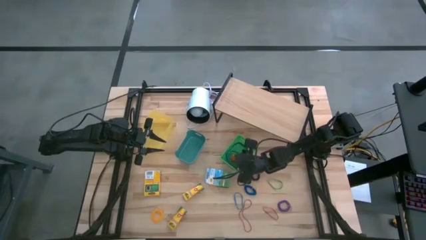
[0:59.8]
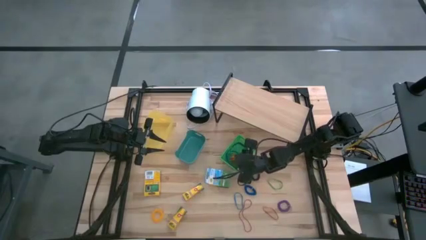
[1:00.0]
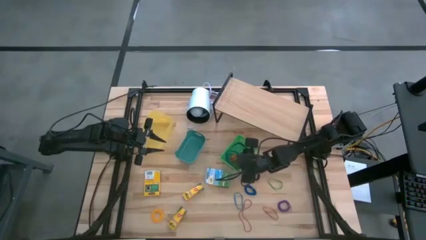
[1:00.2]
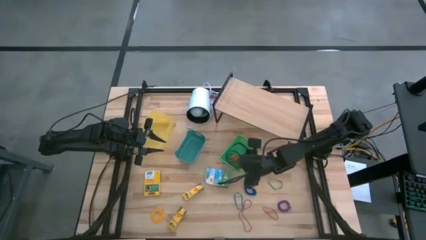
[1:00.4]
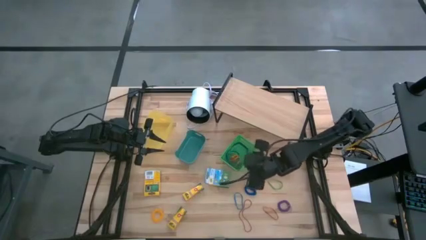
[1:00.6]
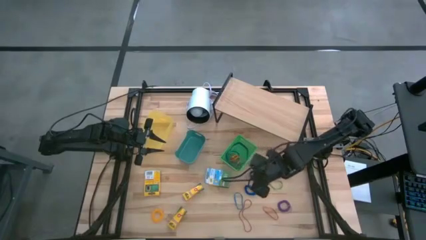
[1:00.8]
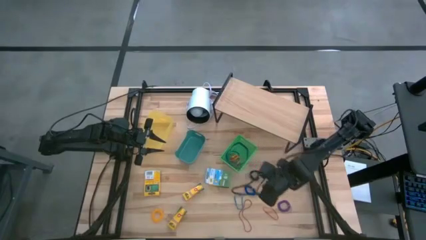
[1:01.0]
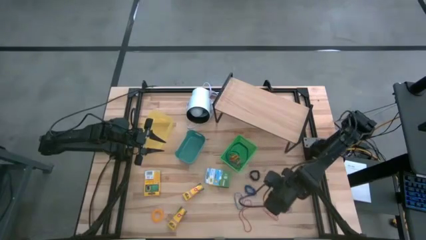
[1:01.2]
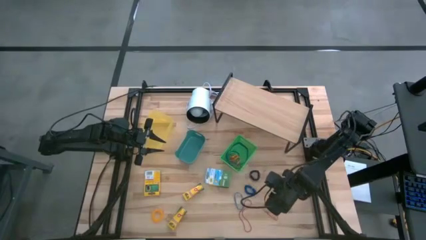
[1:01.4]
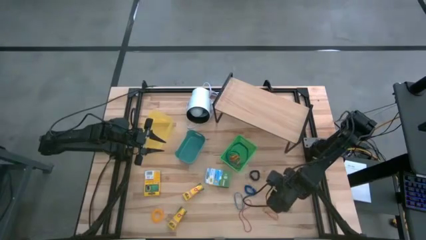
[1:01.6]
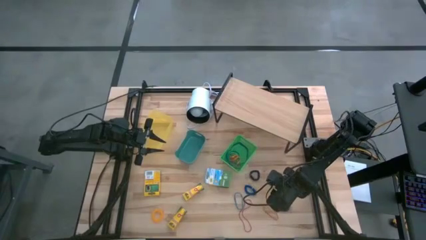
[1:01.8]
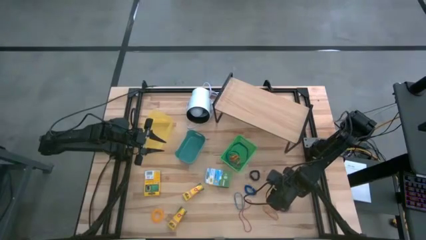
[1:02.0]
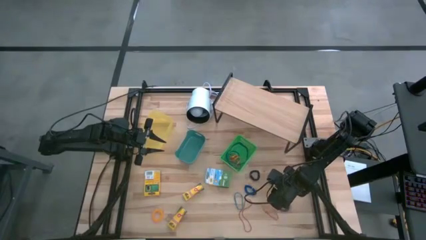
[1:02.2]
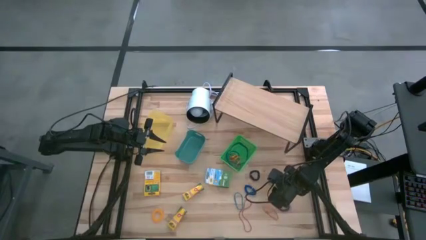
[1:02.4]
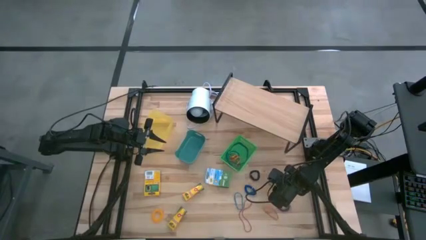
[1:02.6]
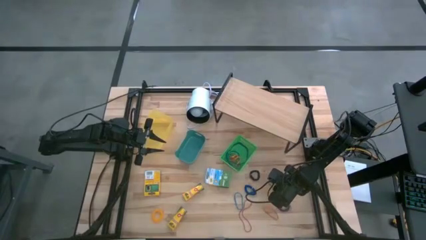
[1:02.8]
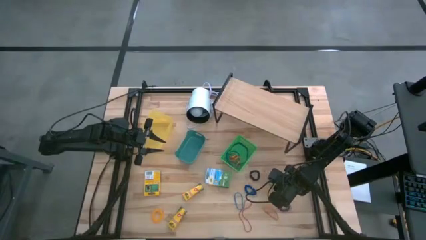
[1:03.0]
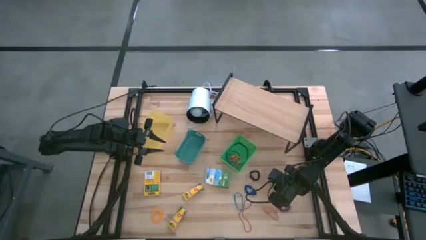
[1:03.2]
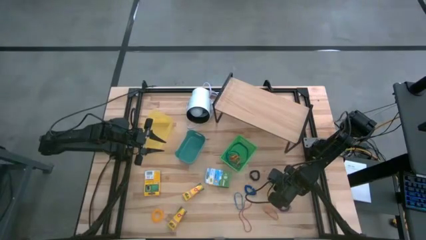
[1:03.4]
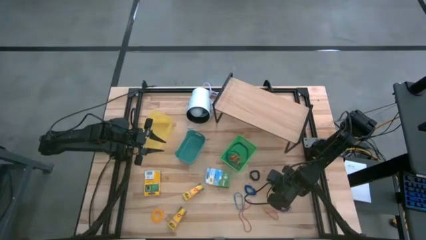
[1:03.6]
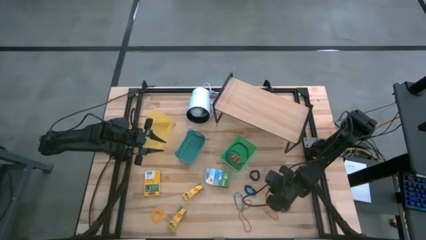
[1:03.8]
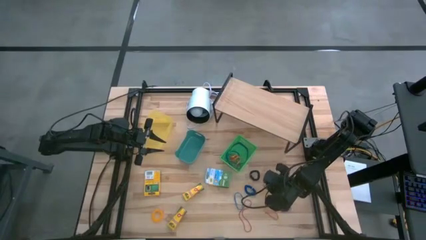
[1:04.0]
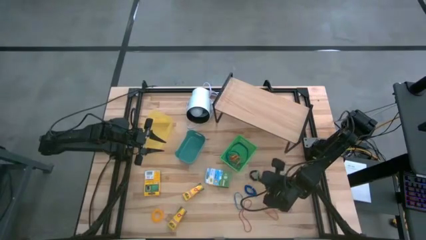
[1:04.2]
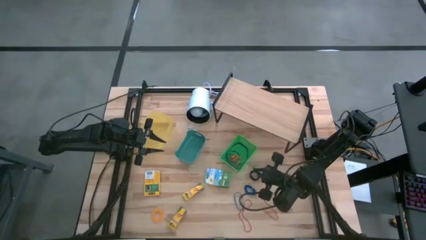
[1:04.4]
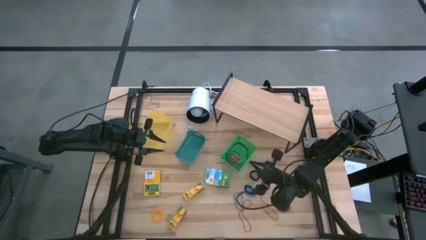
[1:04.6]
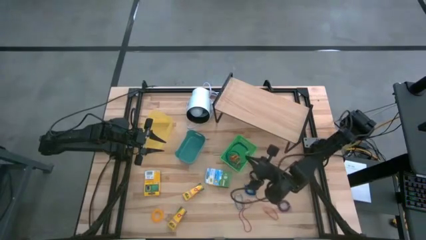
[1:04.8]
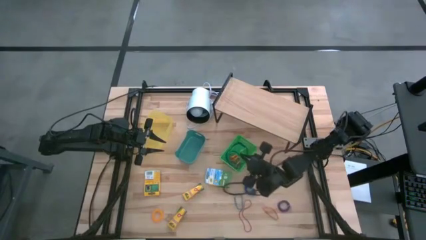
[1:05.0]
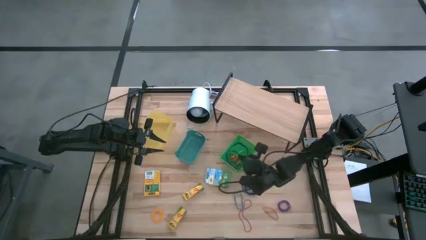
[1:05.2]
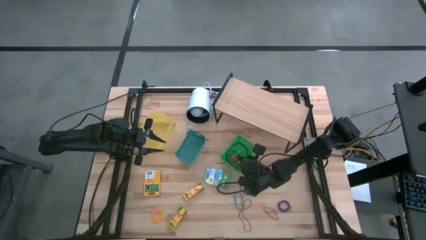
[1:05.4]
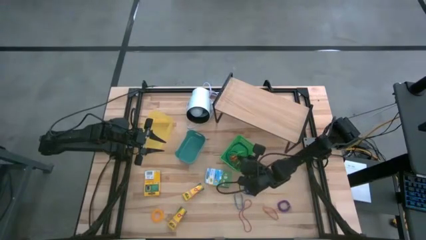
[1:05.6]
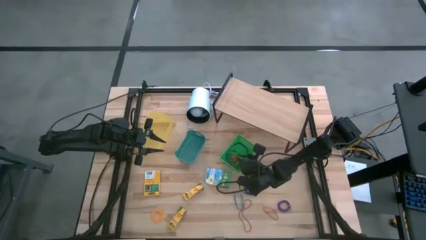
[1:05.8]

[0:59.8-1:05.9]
Task: Pick & Place Office Desk Supplies
Put the green rubber band into the green bin

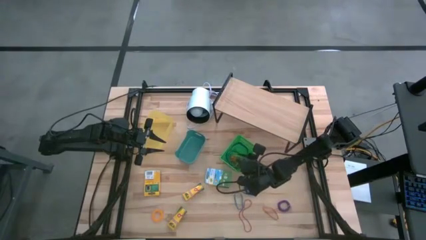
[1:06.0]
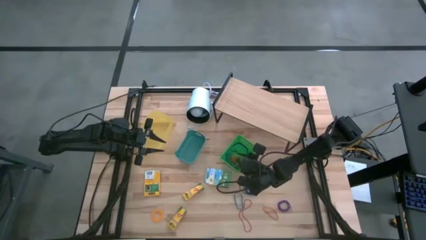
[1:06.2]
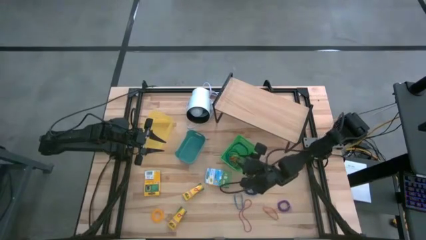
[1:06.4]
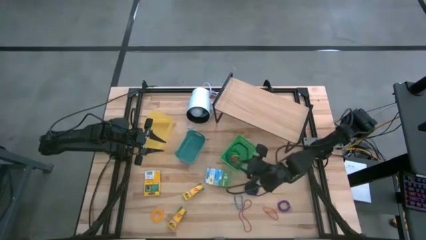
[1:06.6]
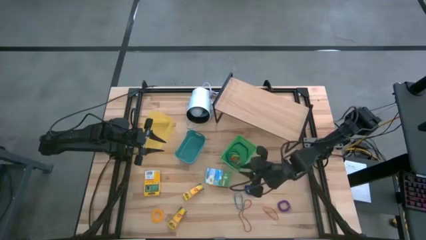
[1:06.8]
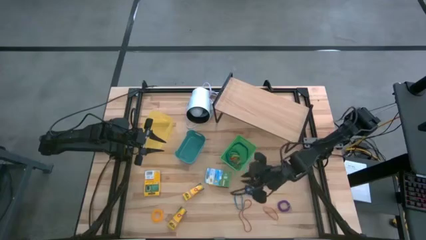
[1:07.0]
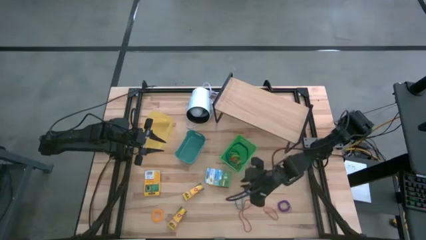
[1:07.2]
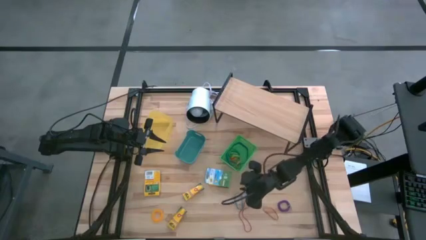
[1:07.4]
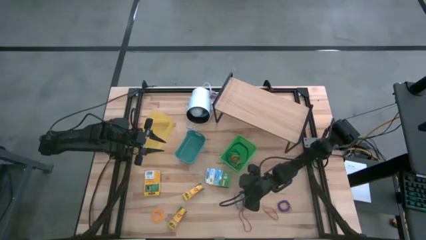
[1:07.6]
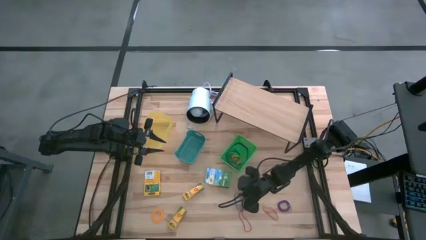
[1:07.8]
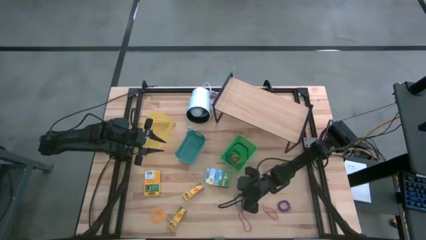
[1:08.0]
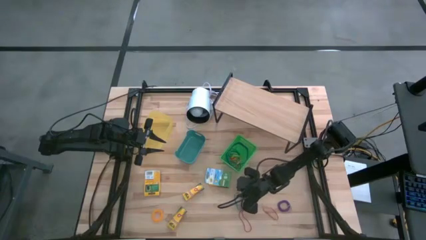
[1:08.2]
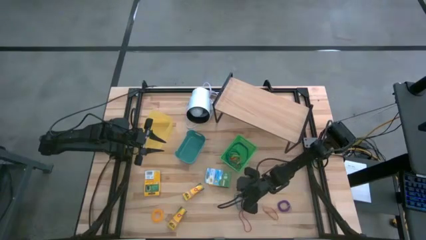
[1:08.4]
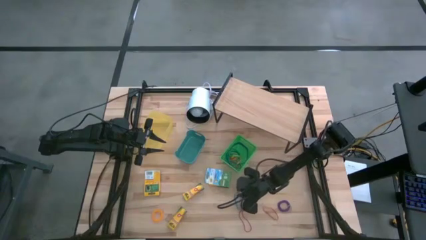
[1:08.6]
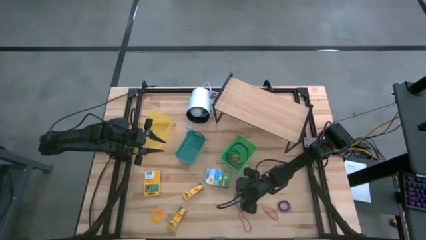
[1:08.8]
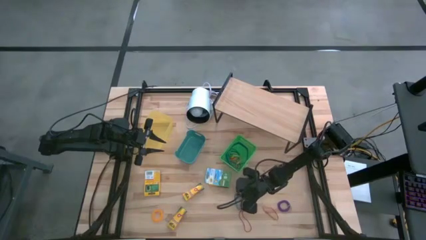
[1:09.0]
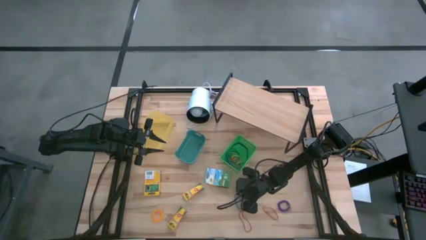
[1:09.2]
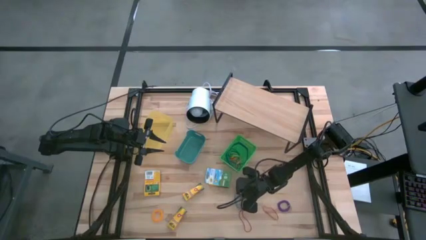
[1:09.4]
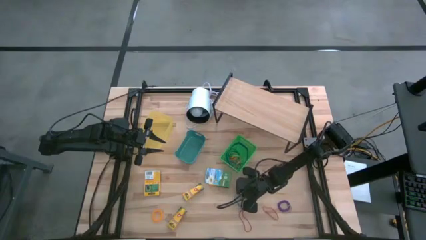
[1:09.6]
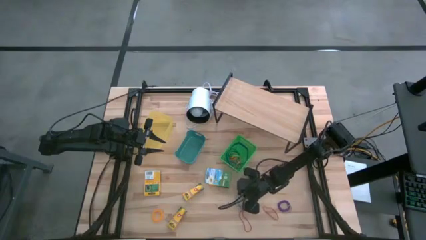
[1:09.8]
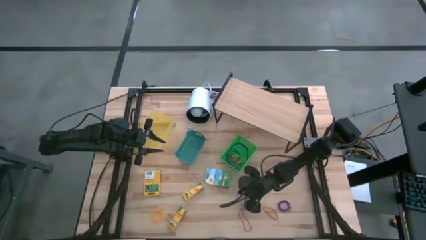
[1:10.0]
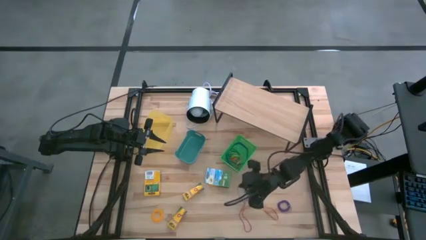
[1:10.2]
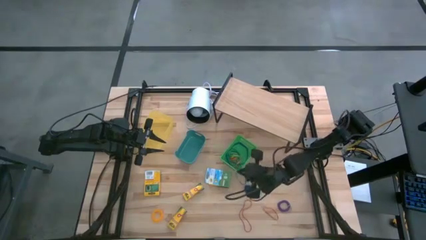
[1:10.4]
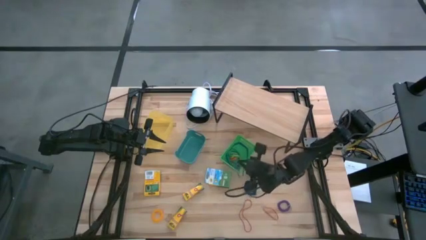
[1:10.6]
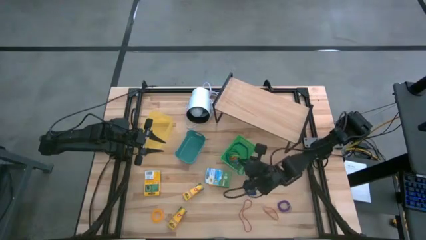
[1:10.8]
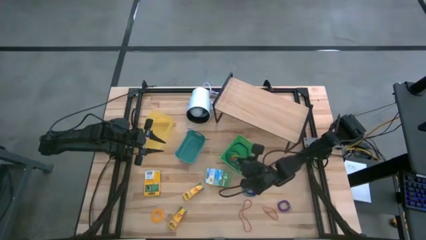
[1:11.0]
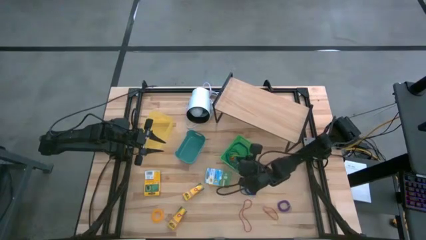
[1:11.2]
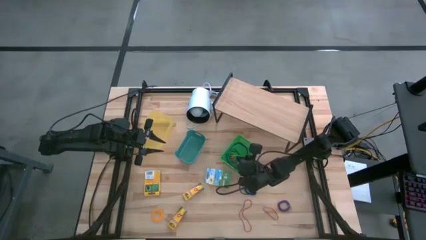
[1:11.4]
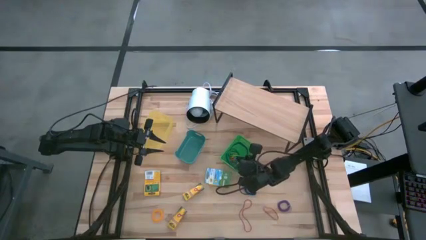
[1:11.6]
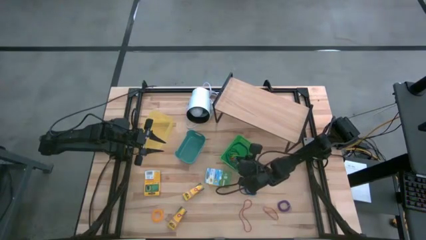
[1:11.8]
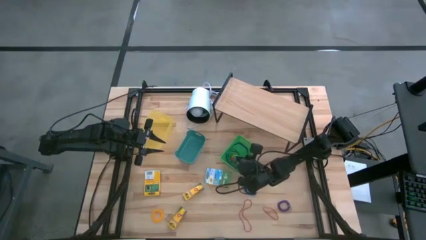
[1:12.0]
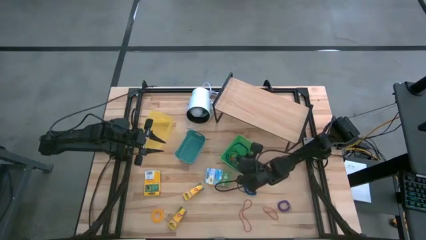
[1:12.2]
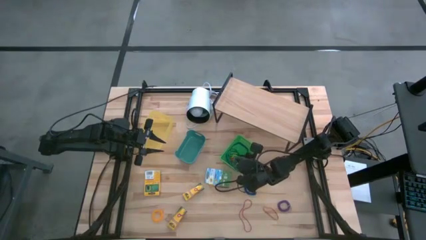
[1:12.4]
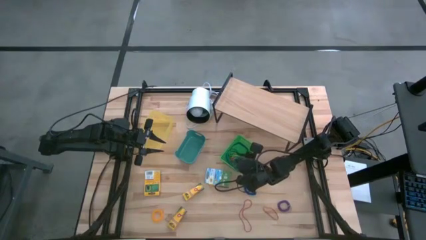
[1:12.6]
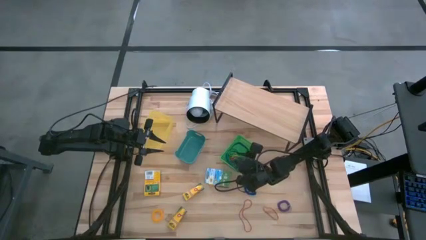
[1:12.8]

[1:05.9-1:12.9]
Put the blue rubber band into the green bin
